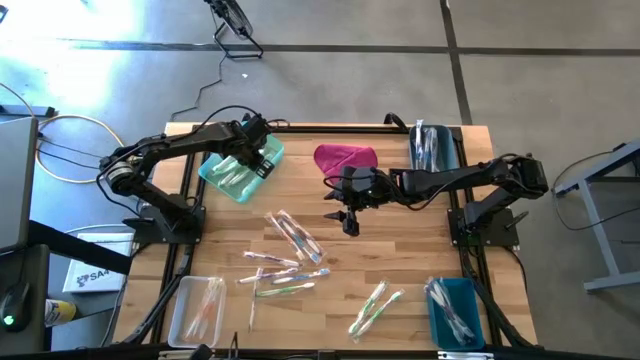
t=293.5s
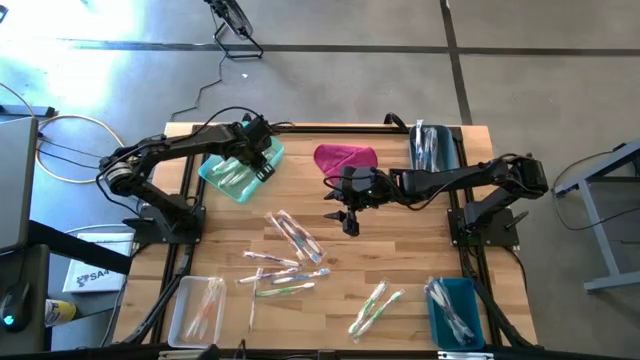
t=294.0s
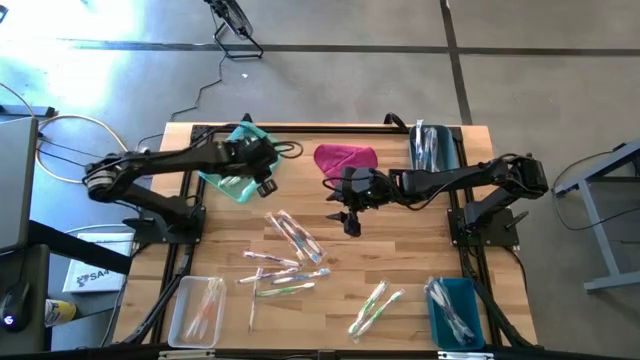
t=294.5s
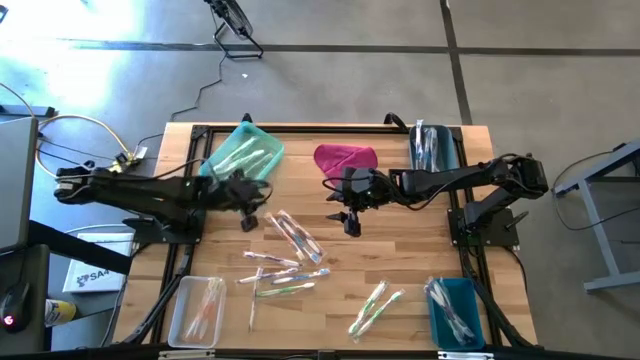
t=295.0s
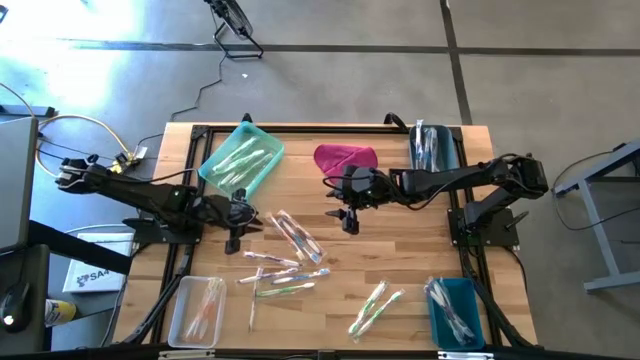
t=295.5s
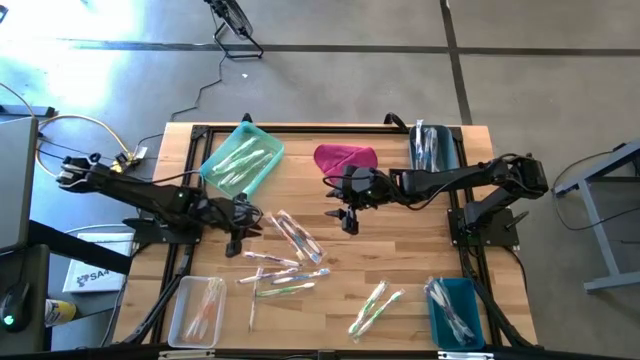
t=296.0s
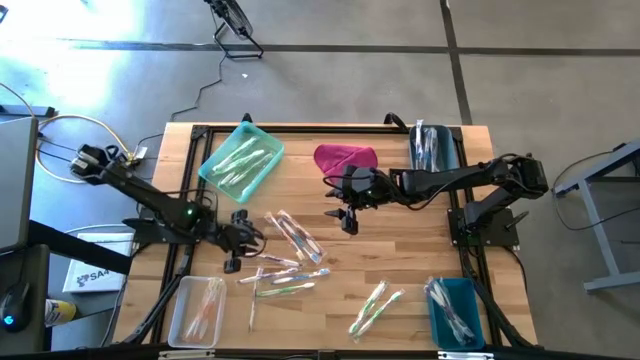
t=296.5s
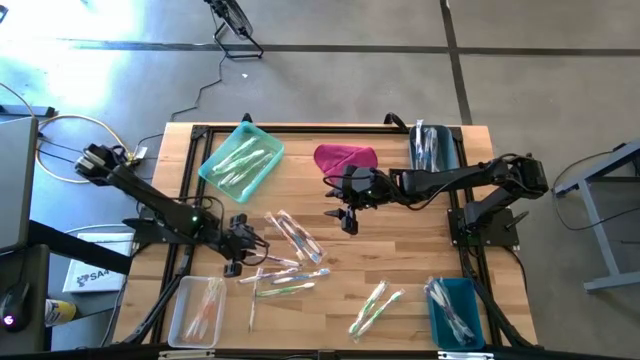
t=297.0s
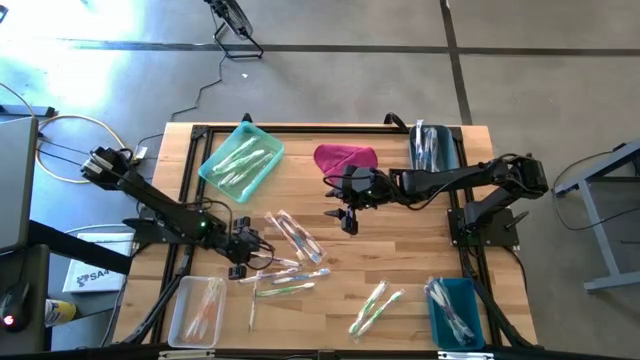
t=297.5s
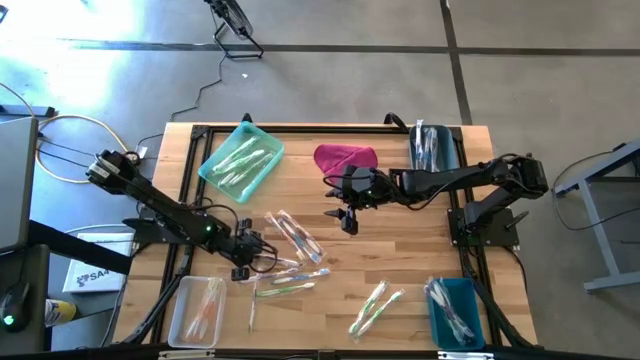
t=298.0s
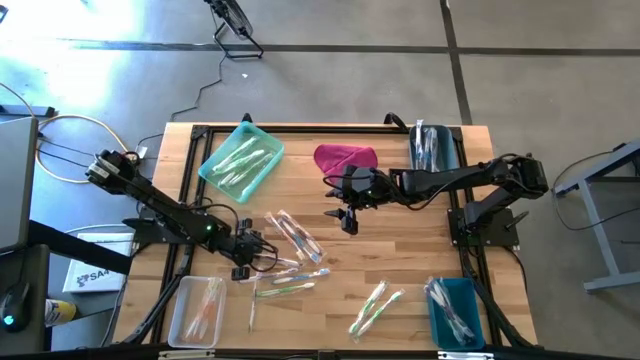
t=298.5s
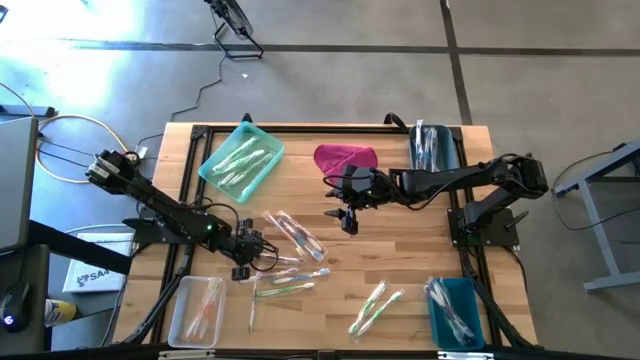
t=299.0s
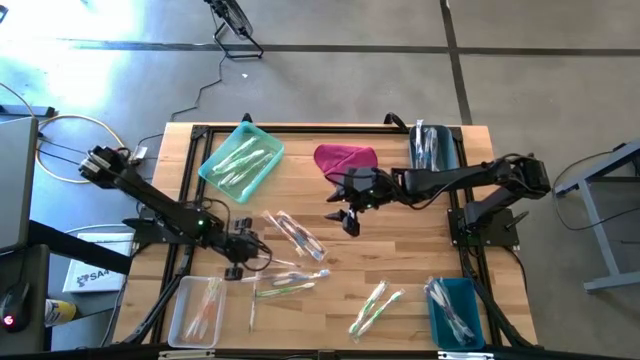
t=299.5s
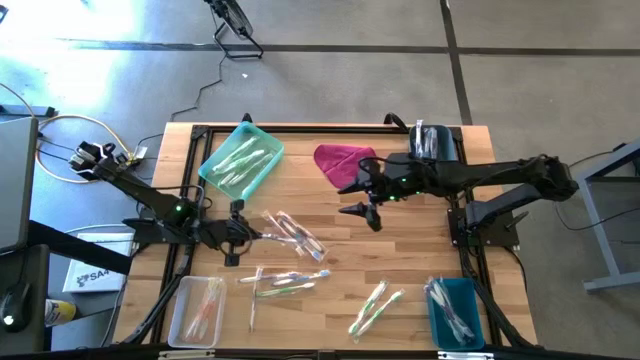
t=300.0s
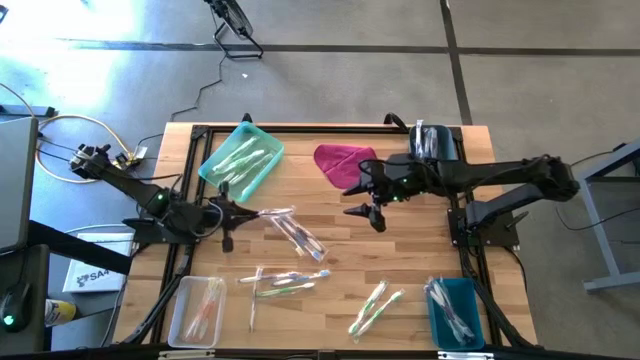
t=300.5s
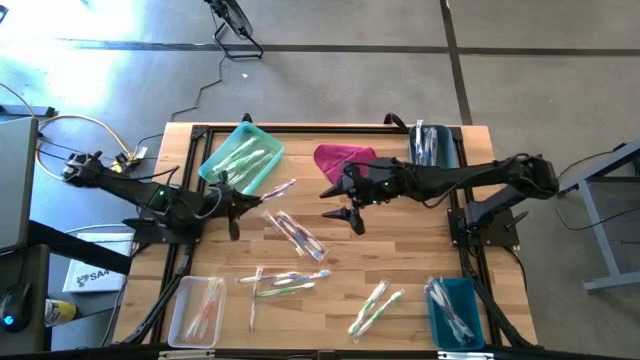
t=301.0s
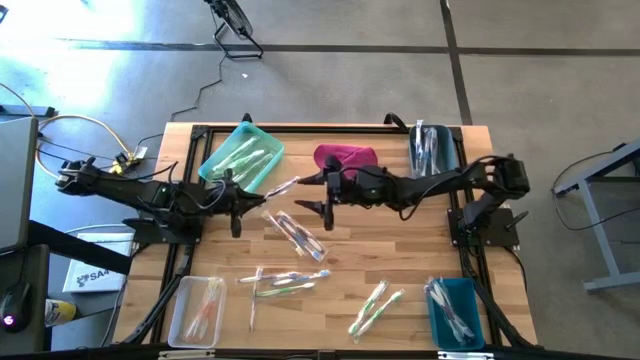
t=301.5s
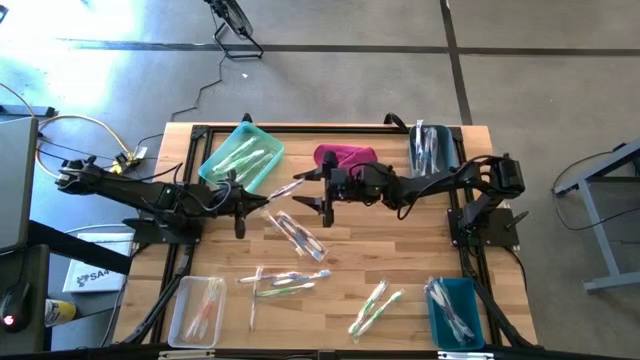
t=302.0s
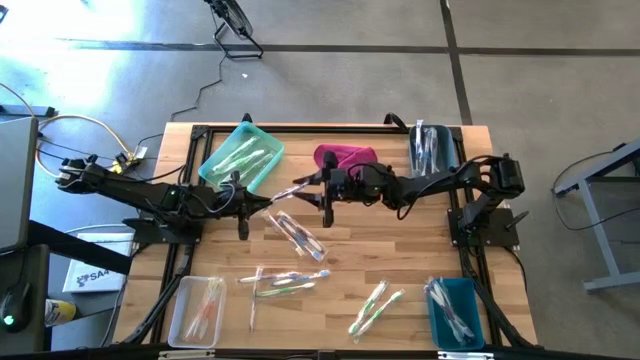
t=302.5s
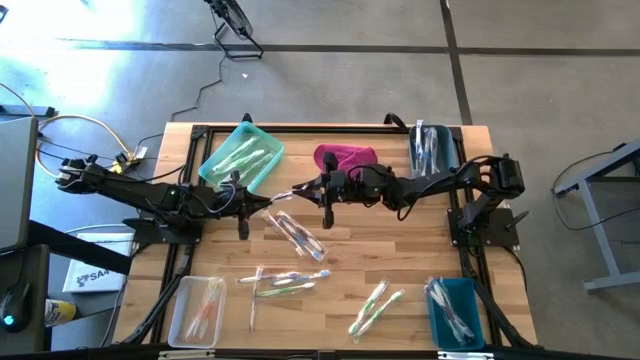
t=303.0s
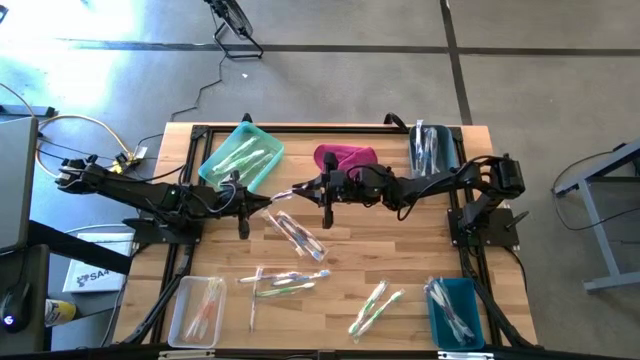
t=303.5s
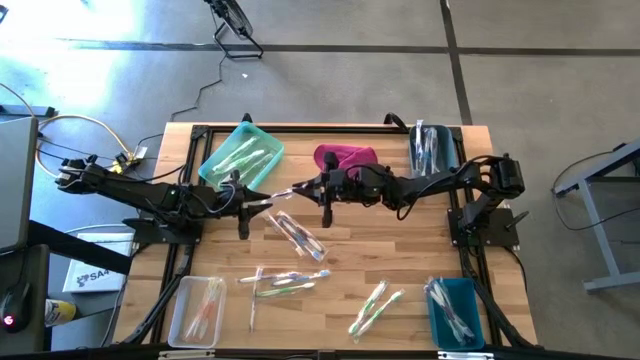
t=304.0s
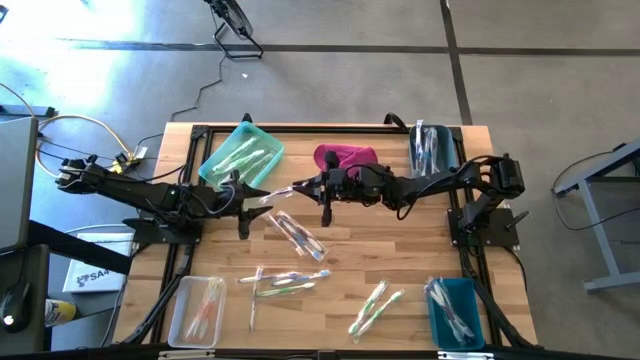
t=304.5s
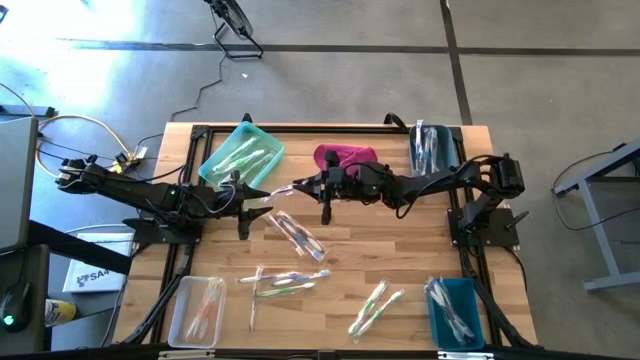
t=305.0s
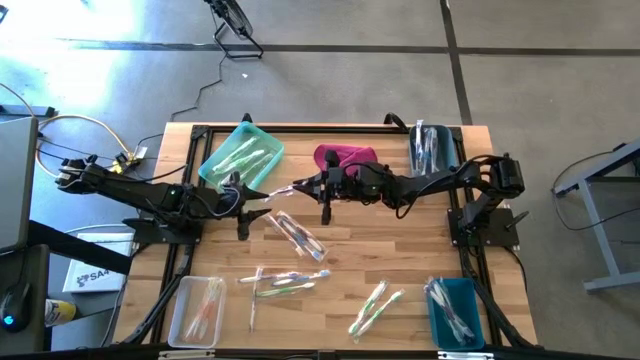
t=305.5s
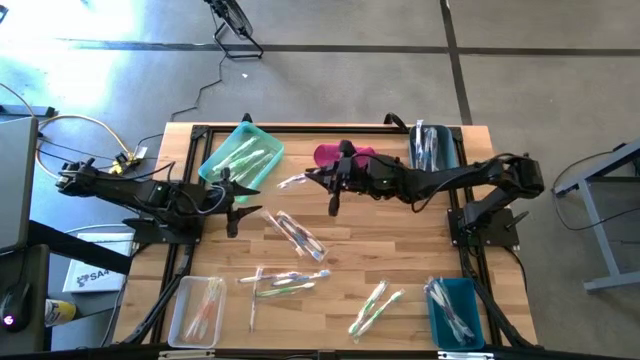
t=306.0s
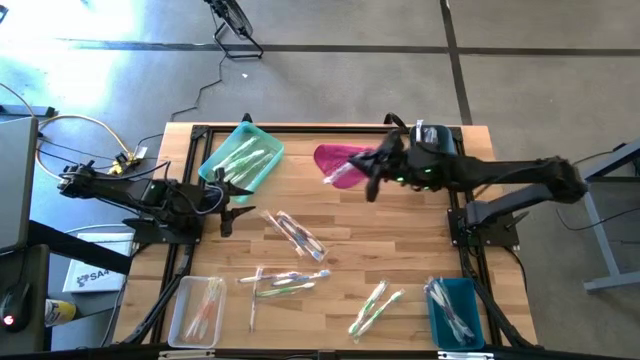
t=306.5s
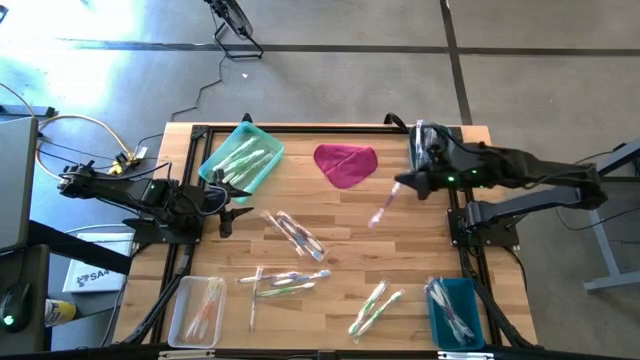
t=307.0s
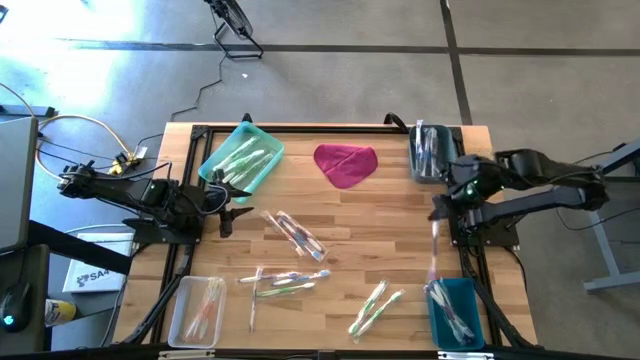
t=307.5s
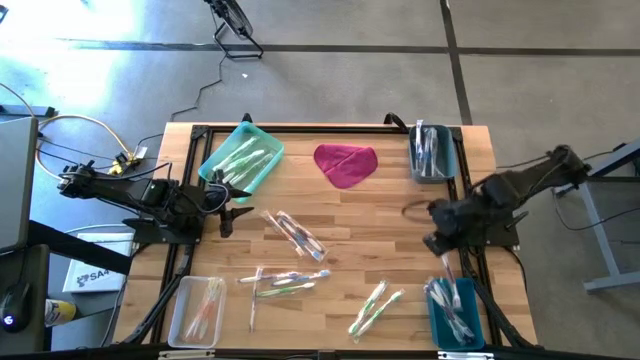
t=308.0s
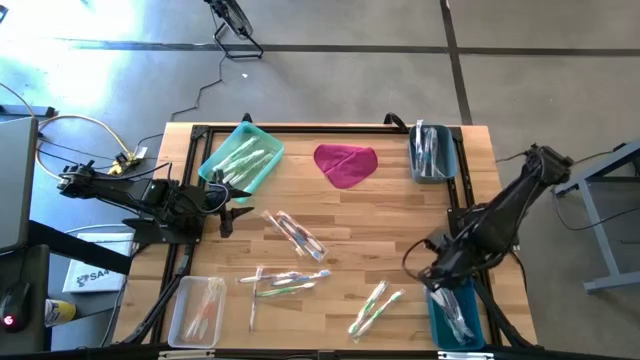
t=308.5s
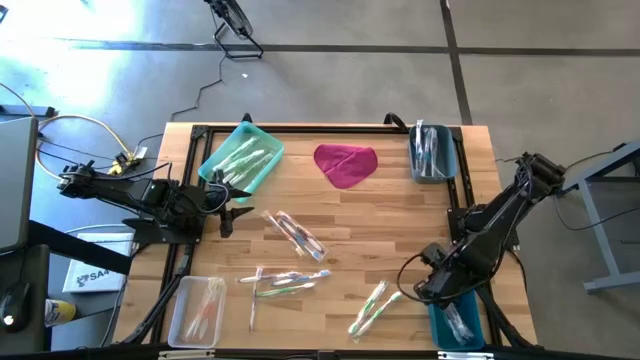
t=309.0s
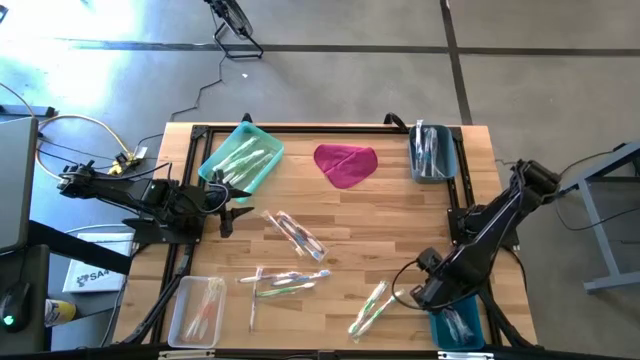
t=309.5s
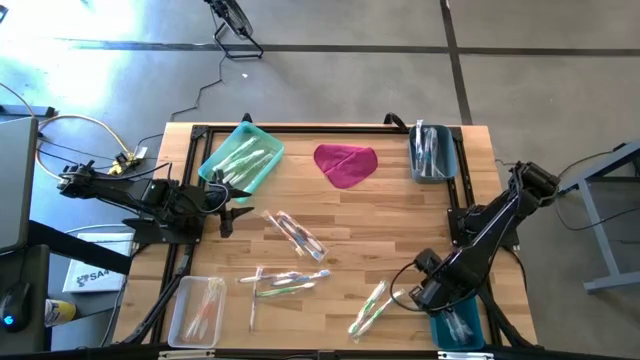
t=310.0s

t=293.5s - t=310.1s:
Task: Pick & Place Toothbrushes
Put the purple toothbrush to the dark blue bin bin

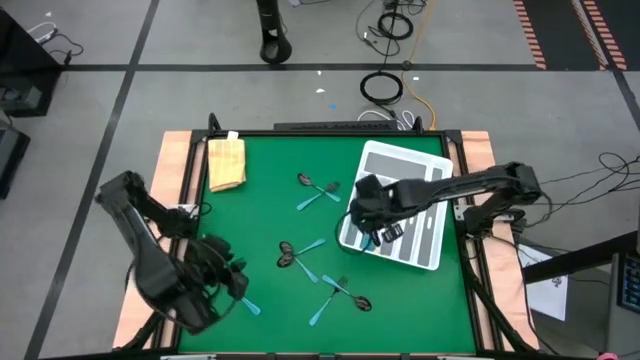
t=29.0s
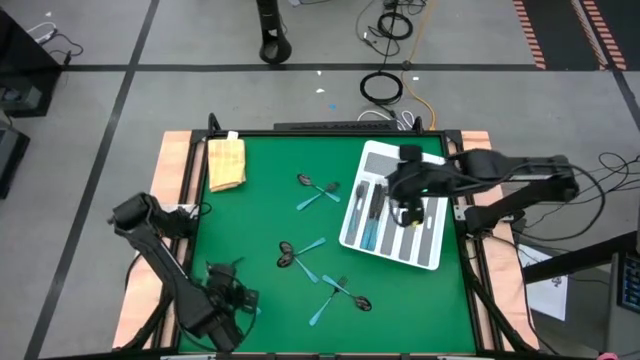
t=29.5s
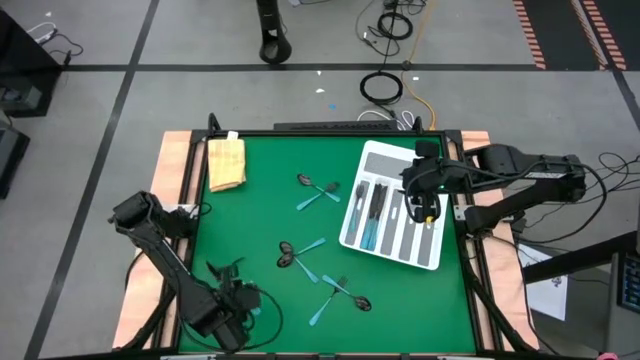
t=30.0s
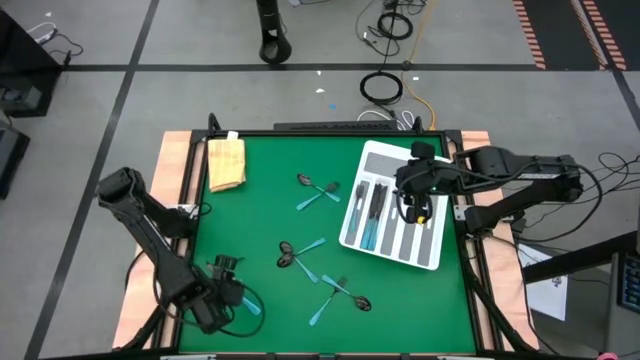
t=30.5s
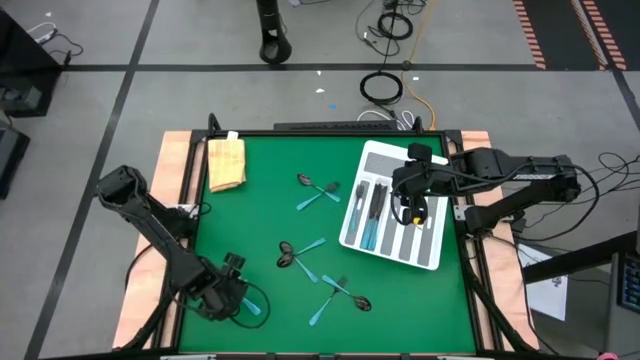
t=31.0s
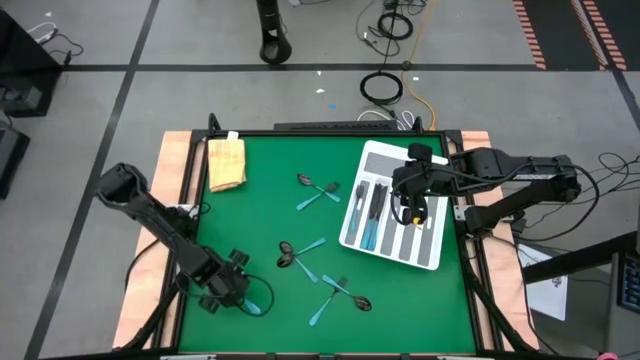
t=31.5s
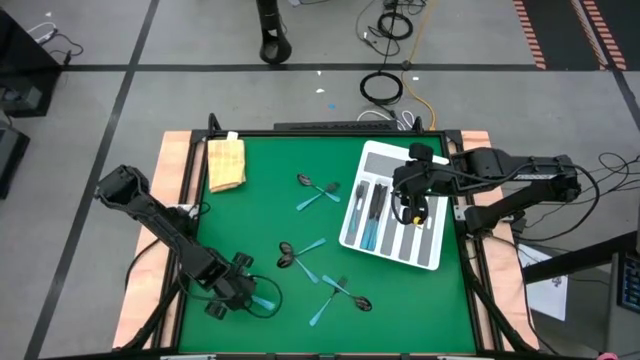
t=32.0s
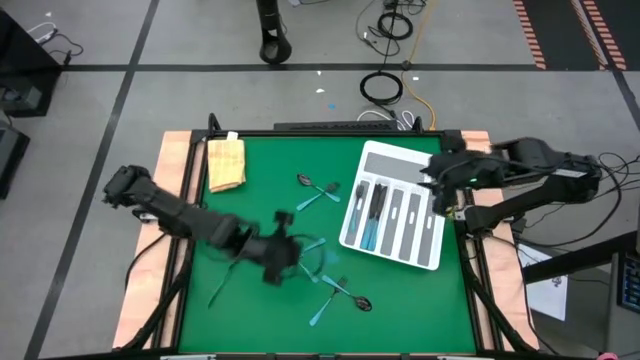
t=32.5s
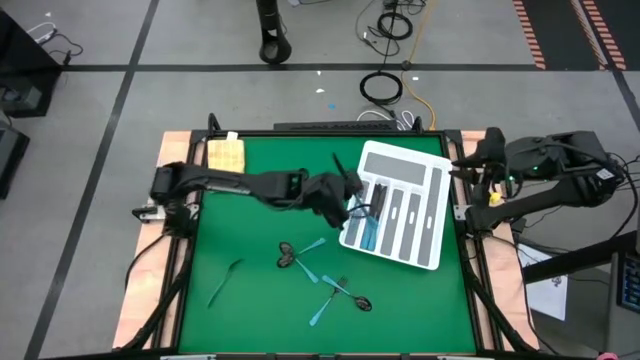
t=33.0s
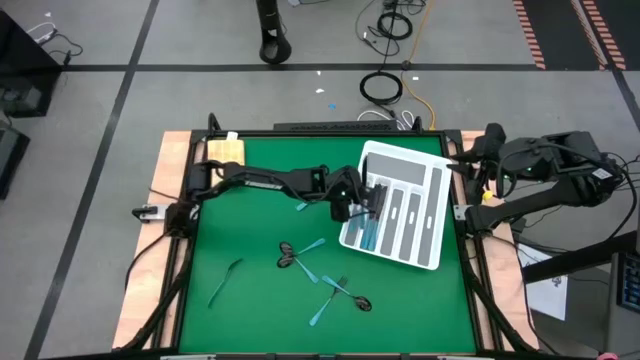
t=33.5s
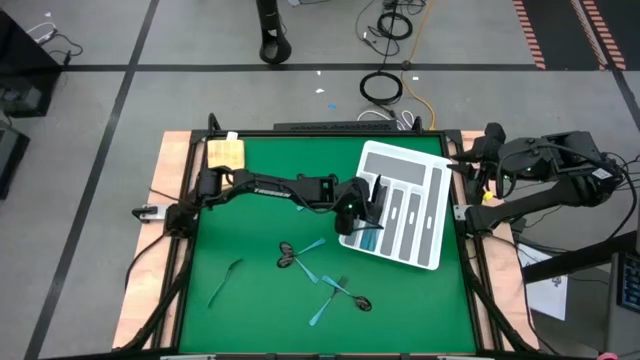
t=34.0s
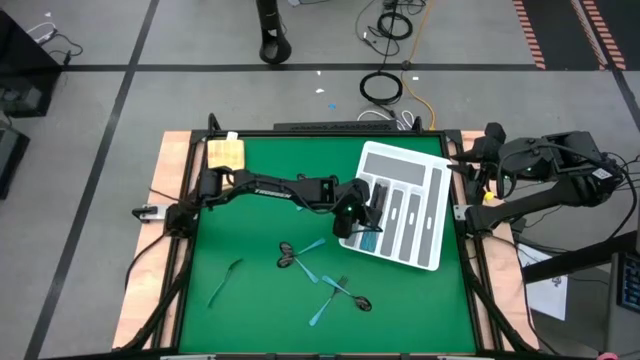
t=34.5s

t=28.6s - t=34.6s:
Task: Sort silverware
Put the blue table knife into the white cutlery tray
